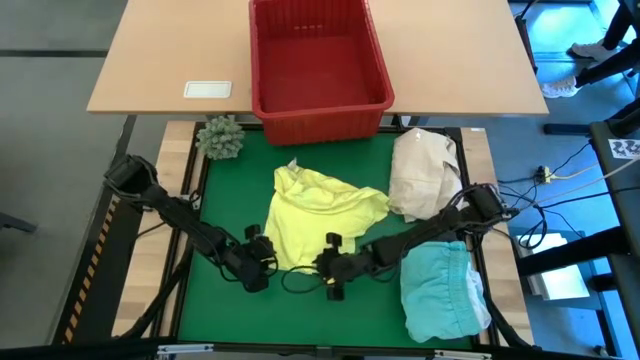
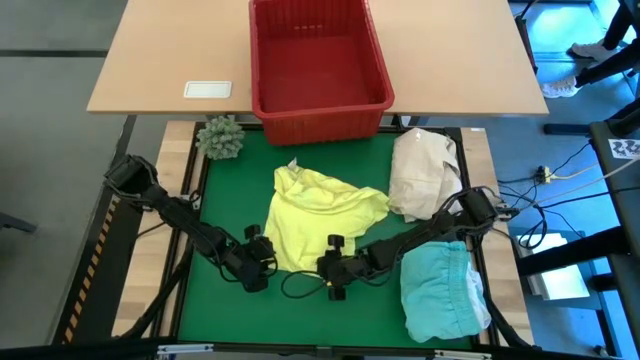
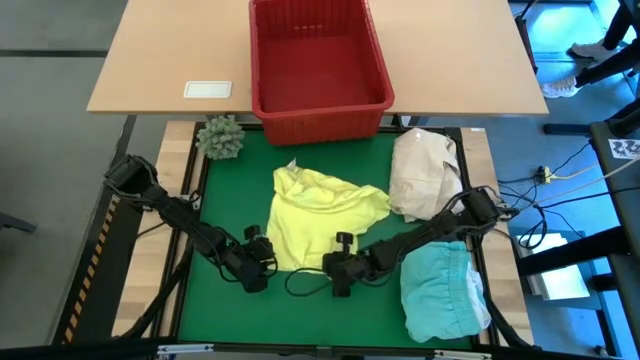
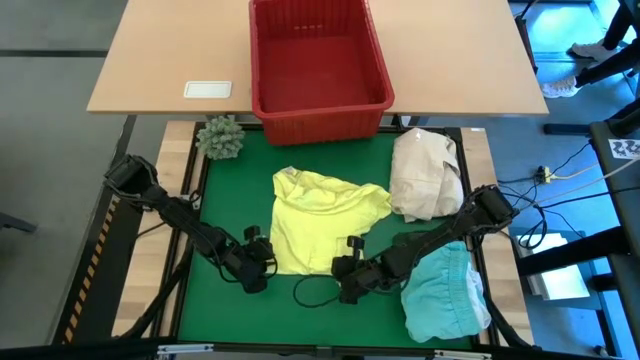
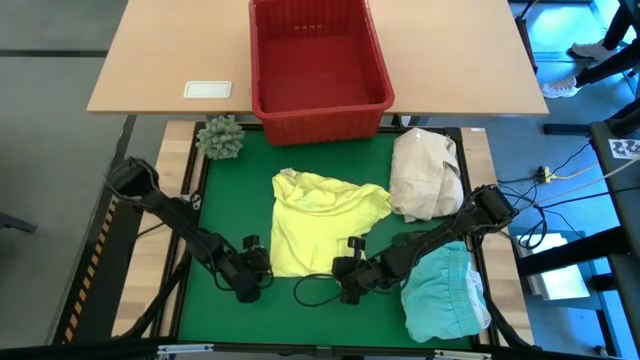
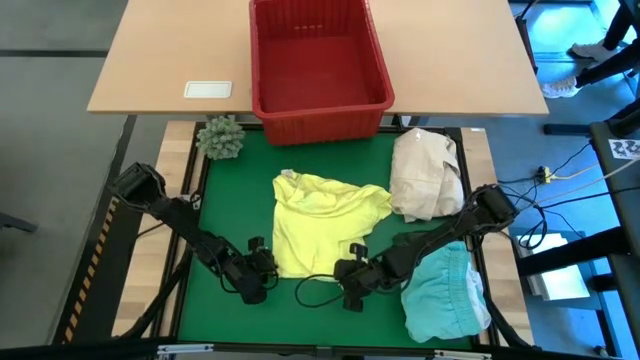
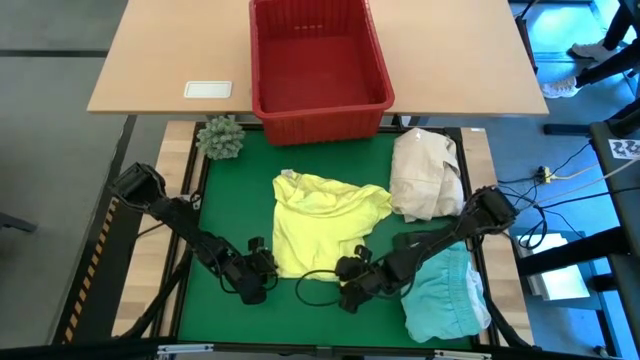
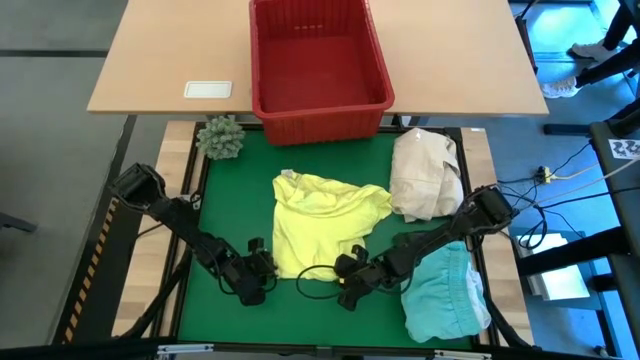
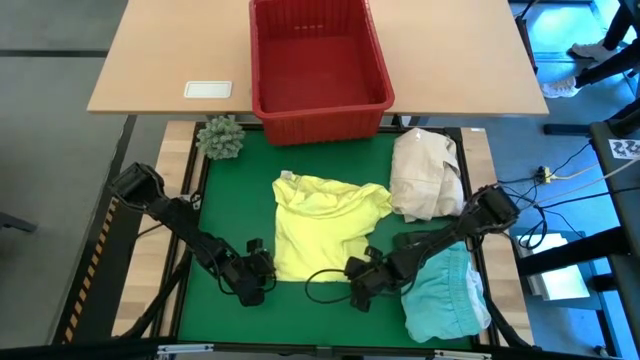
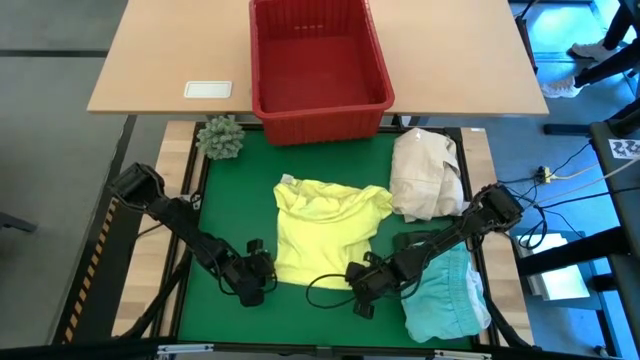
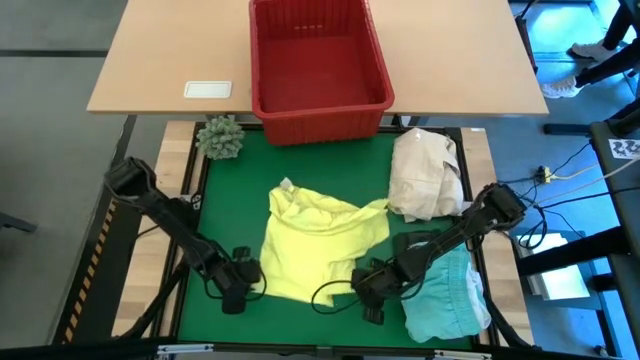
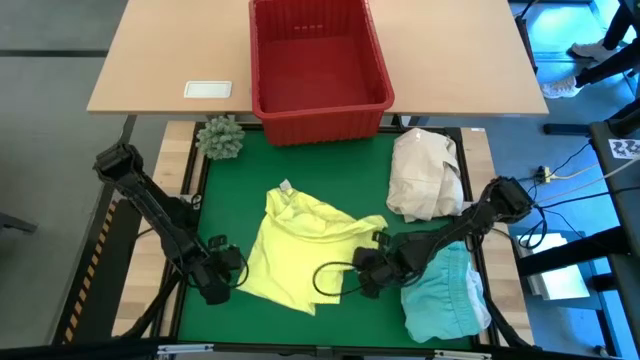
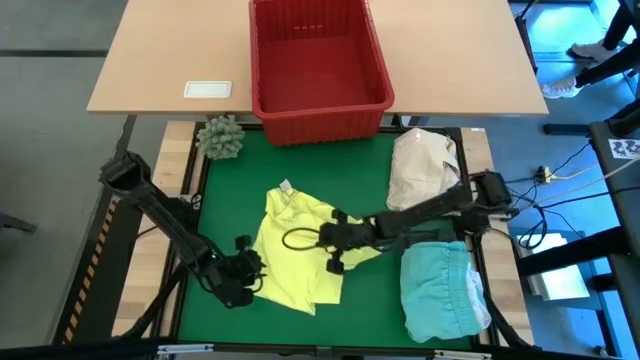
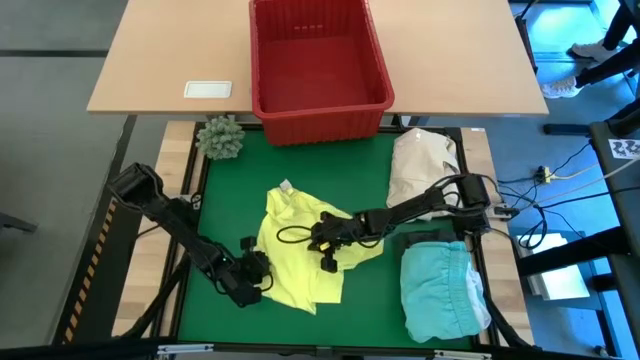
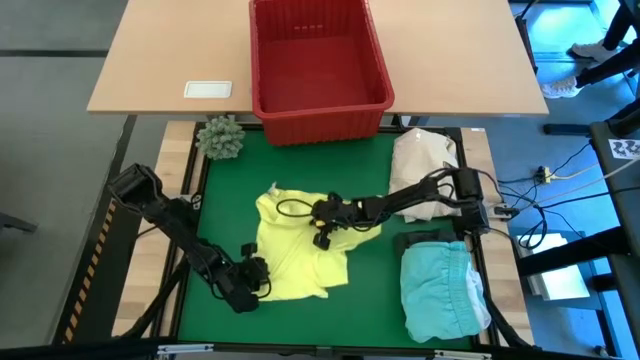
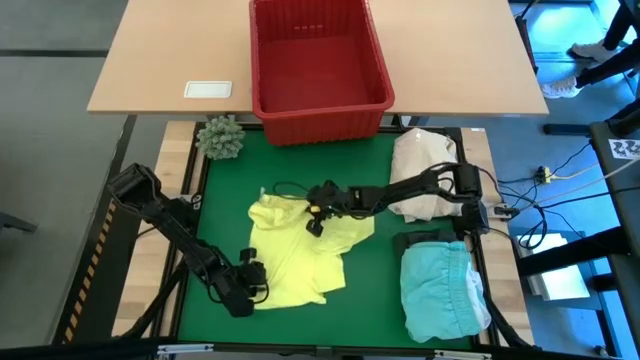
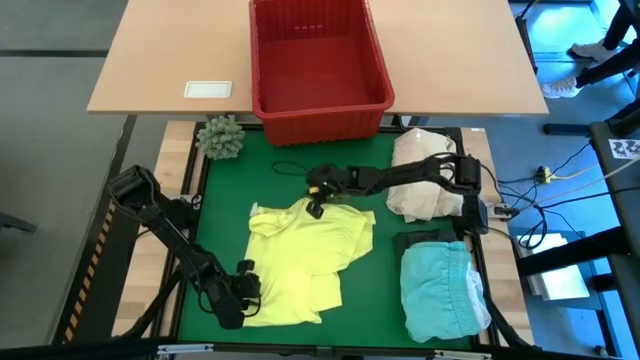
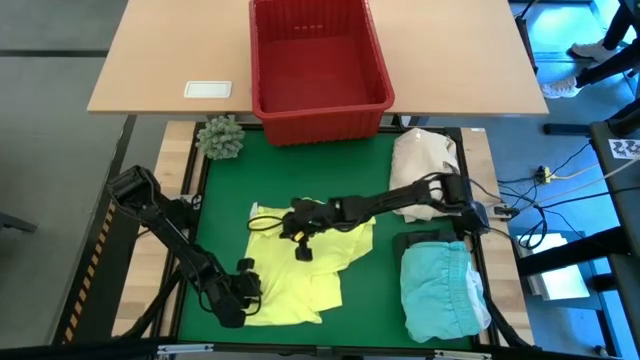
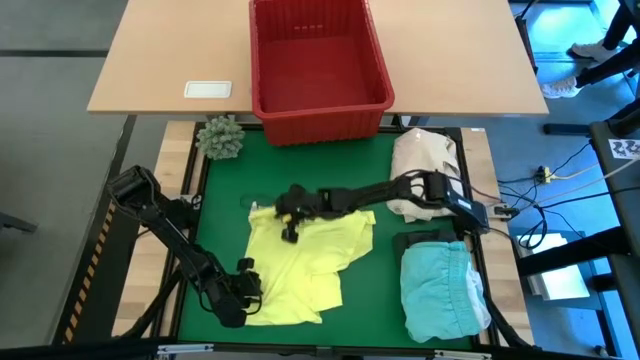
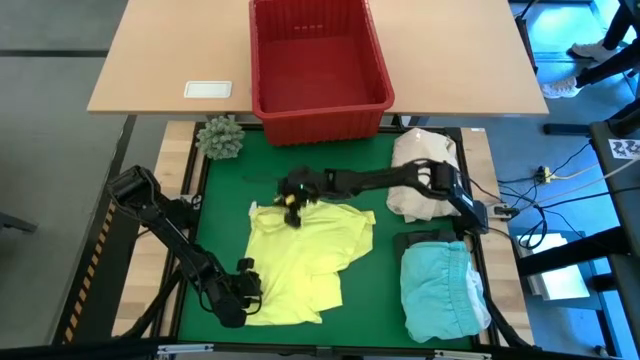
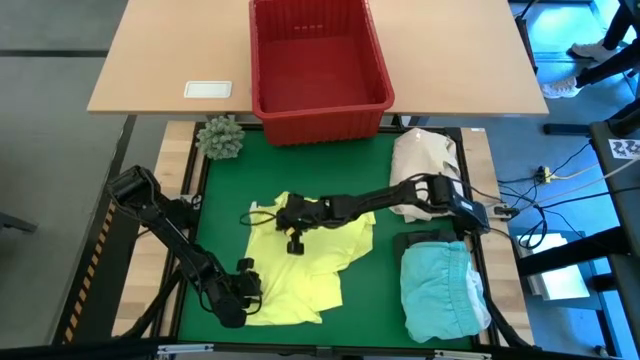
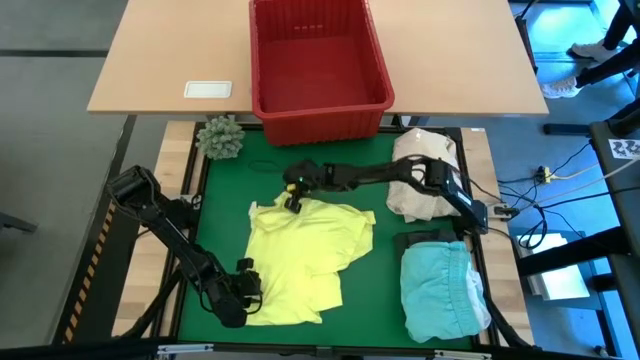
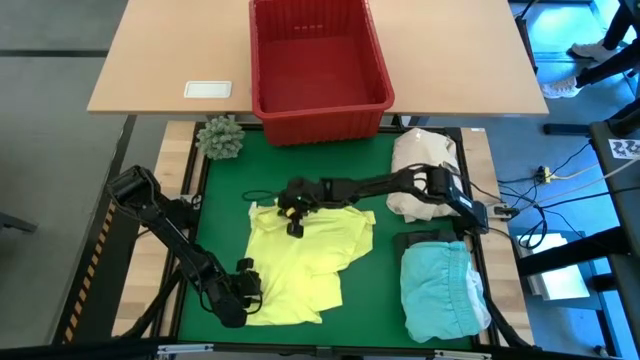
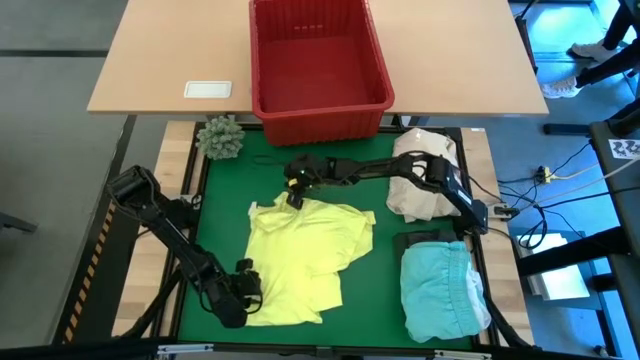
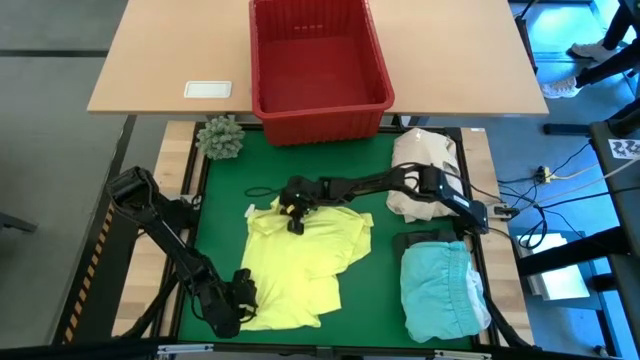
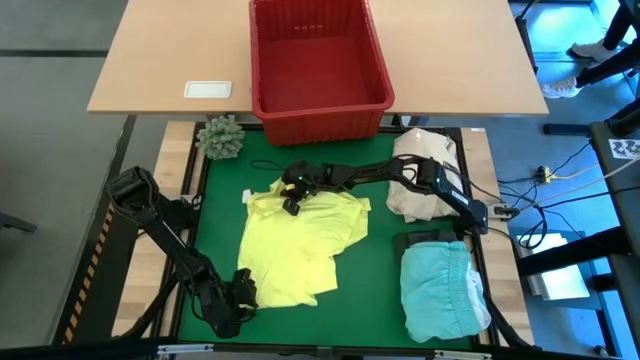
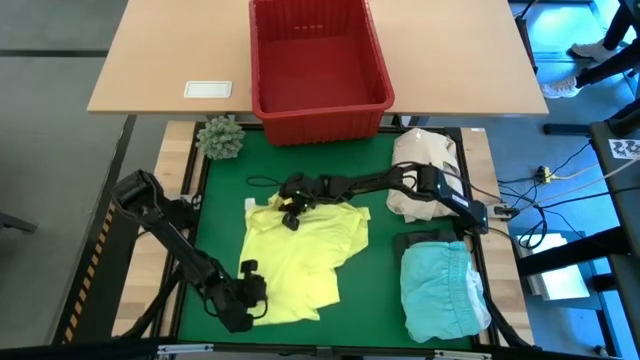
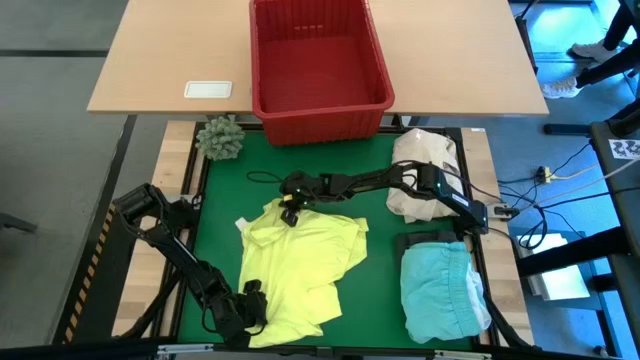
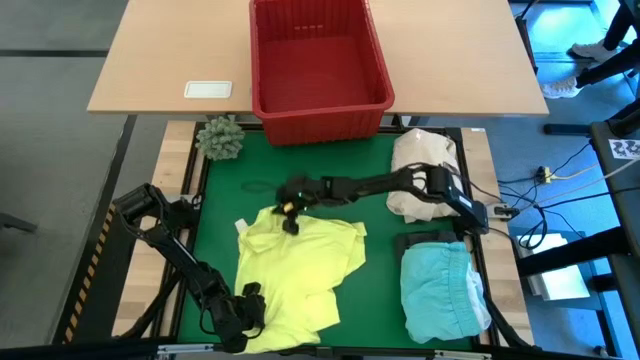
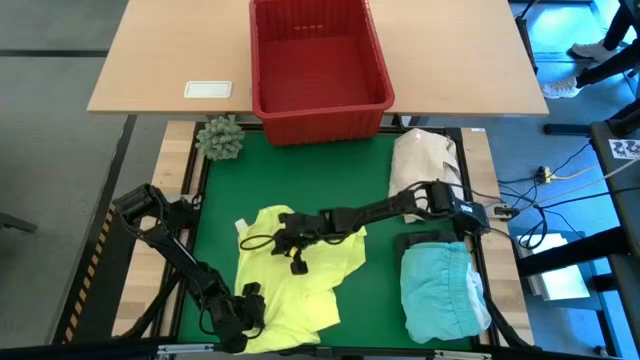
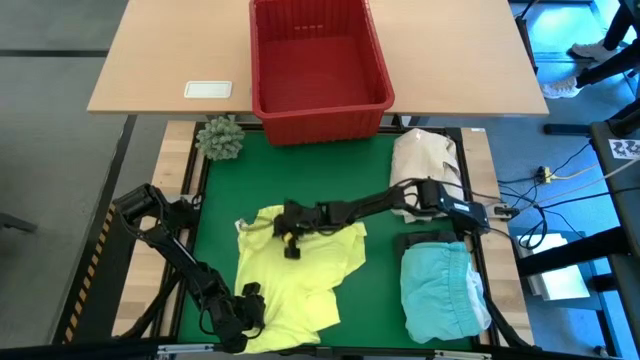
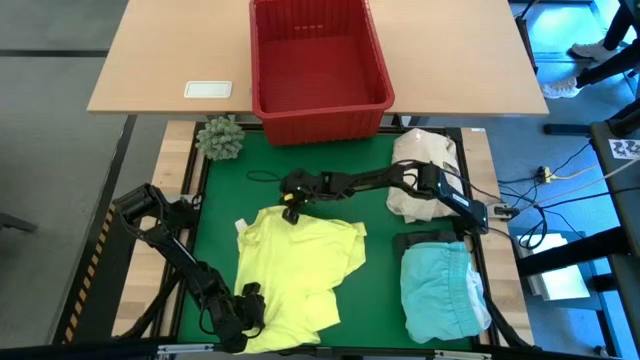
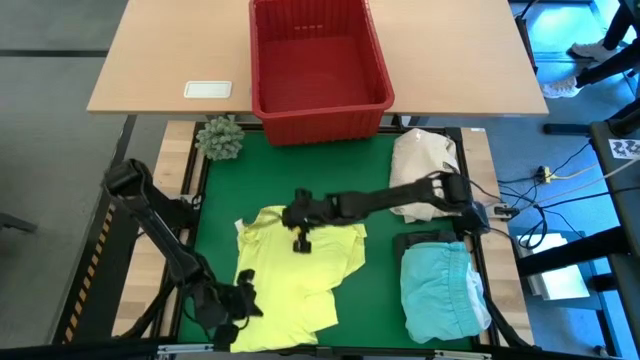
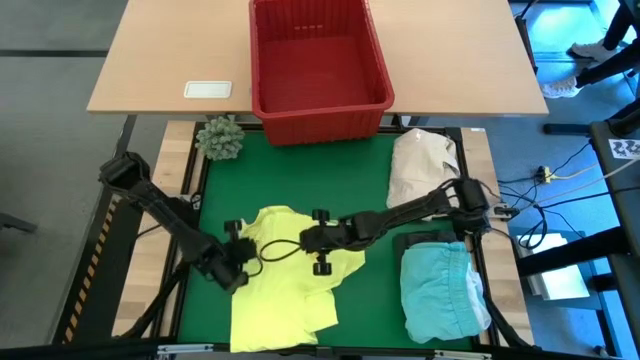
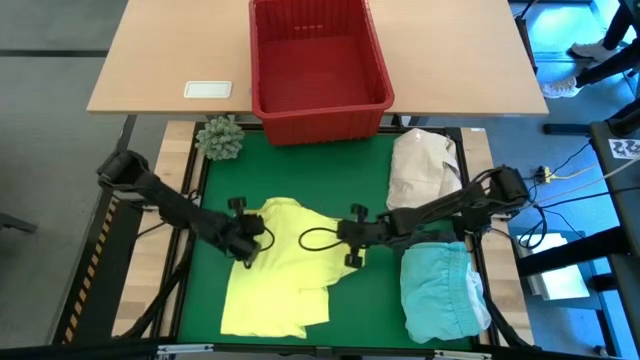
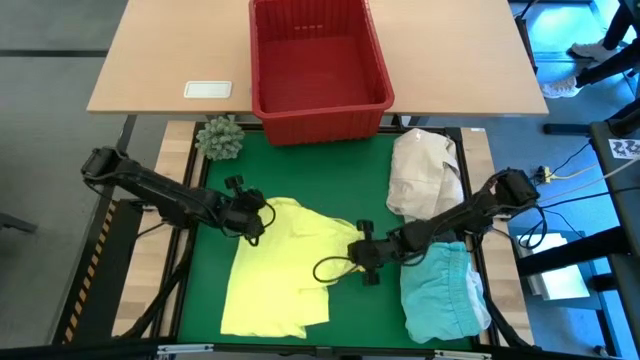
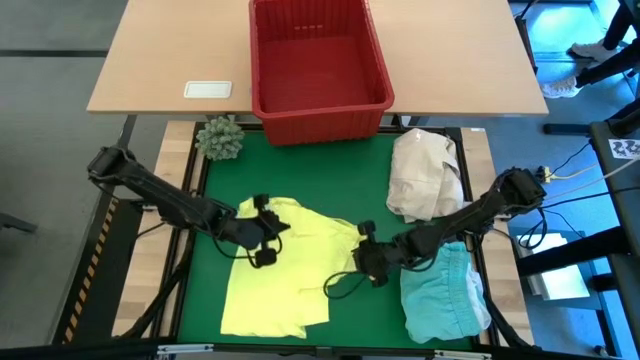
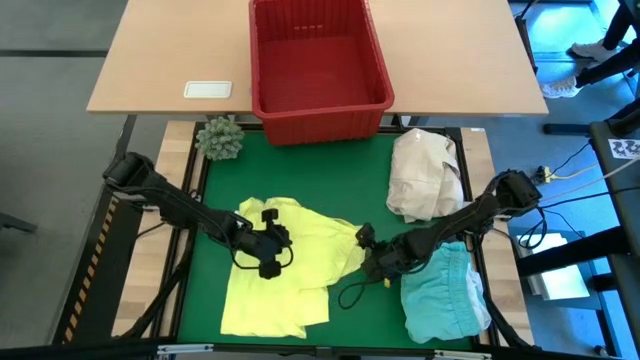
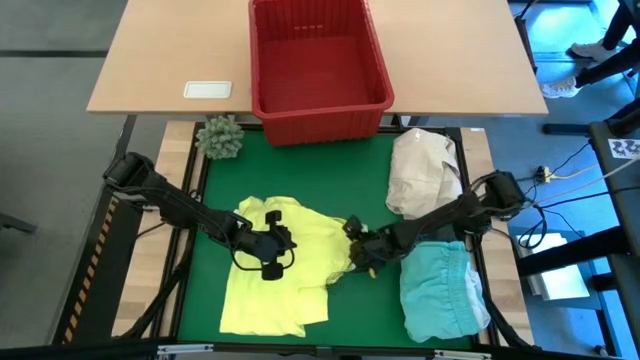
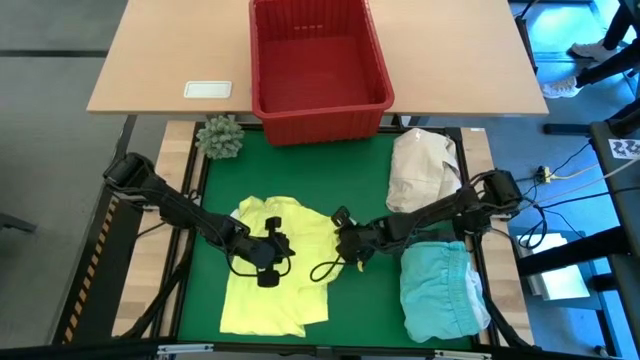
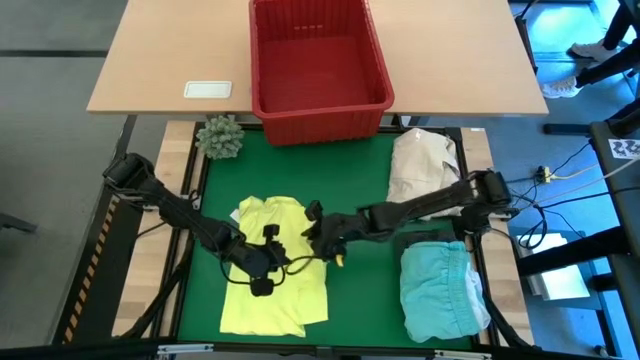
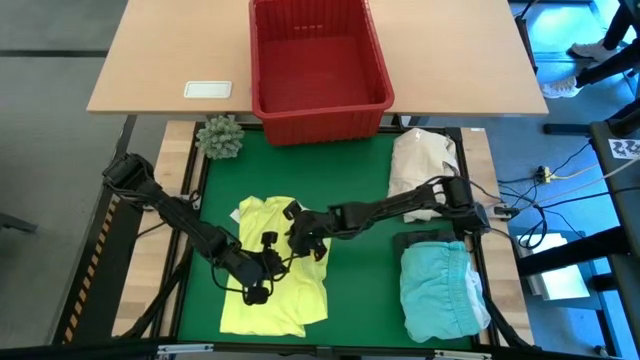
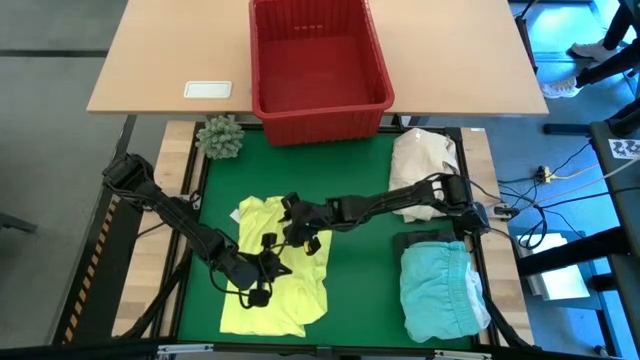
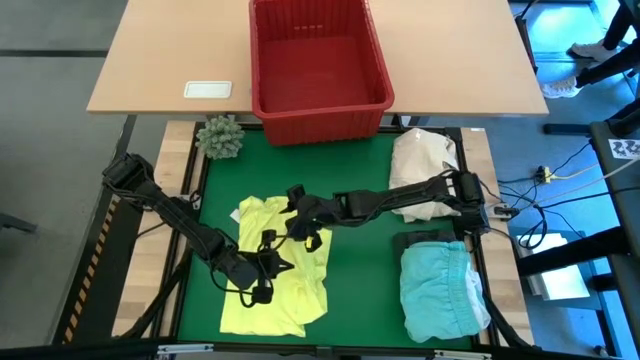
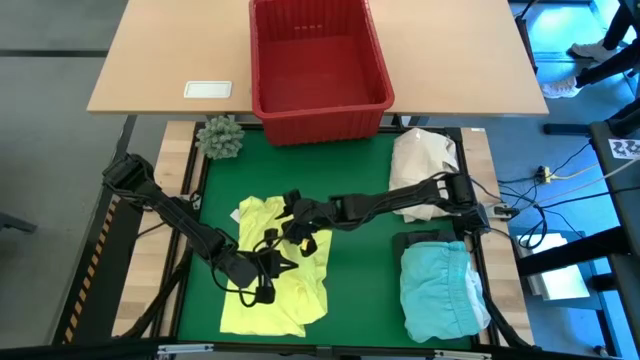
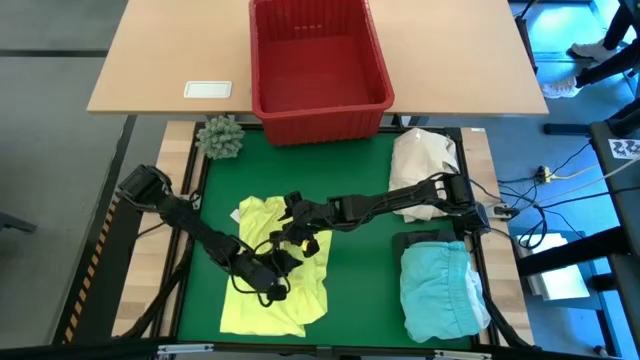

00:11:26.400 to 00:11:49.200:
Task: Fold Laundry from Bin
Fold the yellow shirt
